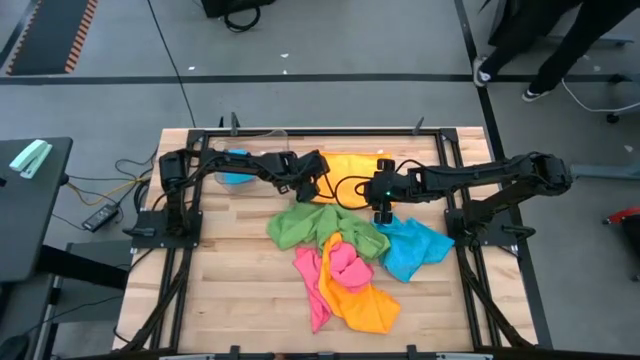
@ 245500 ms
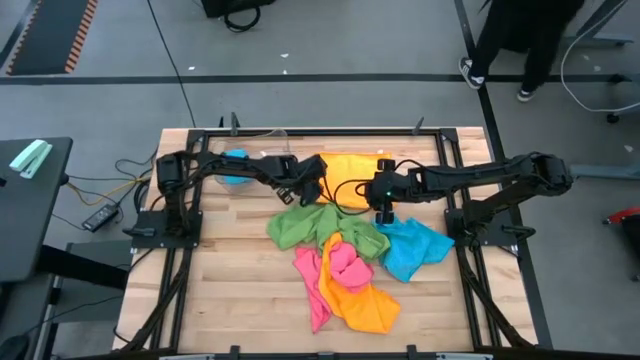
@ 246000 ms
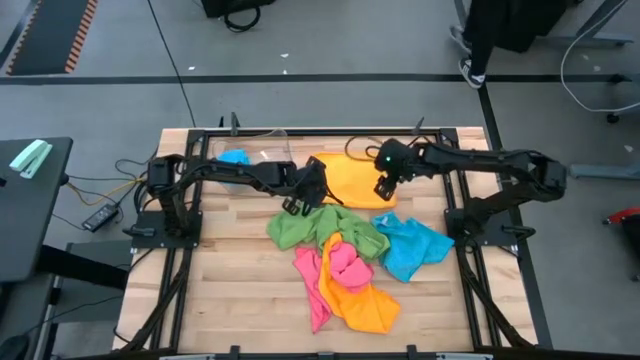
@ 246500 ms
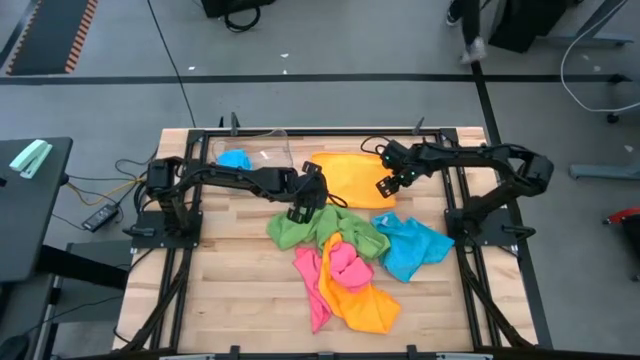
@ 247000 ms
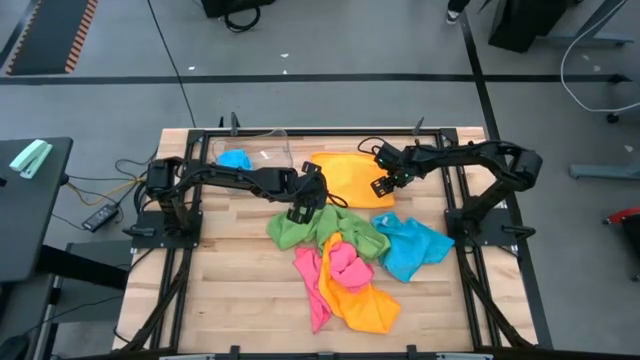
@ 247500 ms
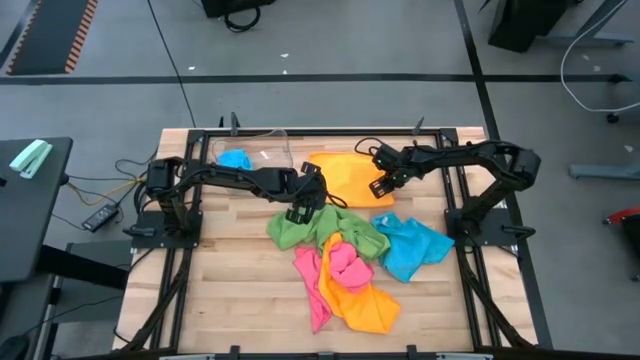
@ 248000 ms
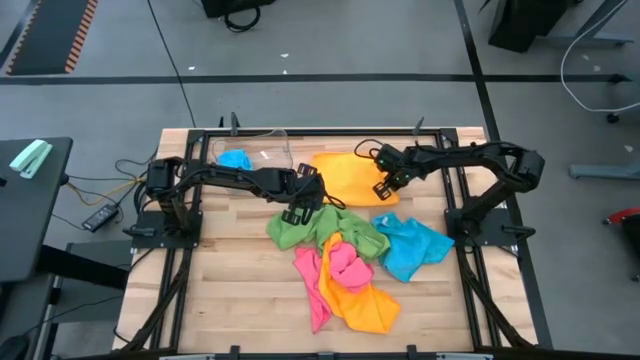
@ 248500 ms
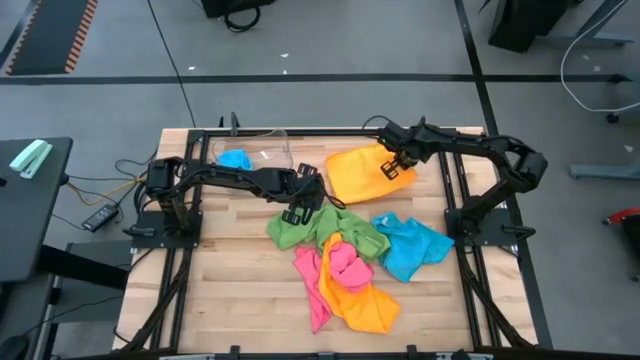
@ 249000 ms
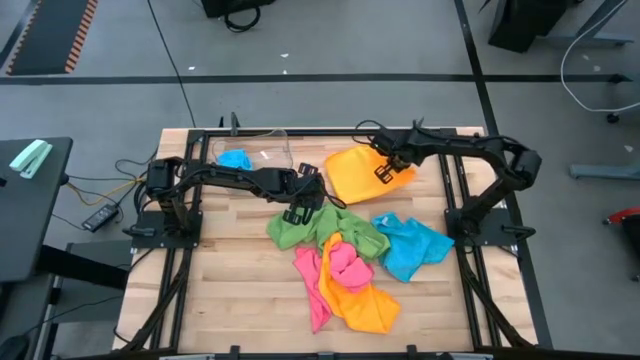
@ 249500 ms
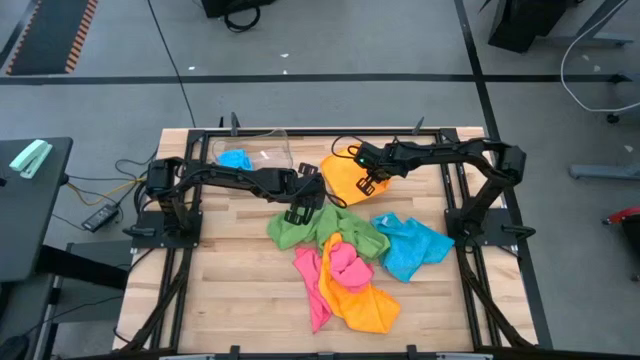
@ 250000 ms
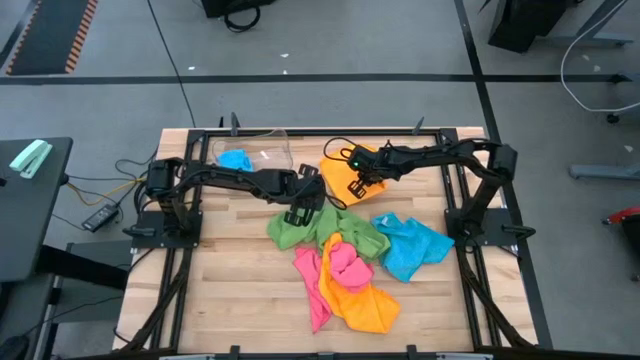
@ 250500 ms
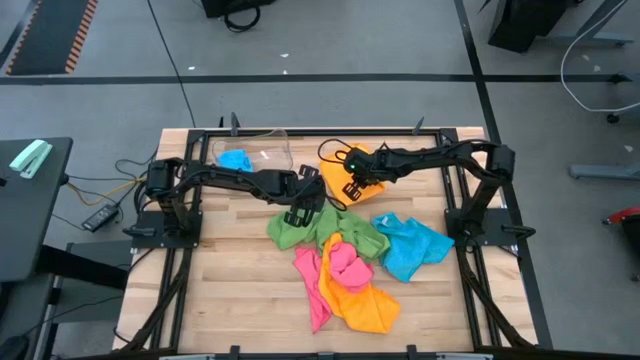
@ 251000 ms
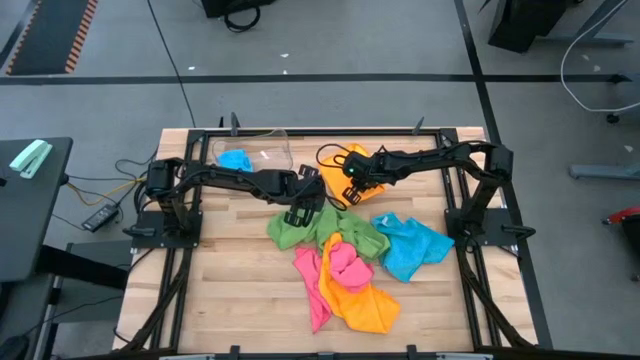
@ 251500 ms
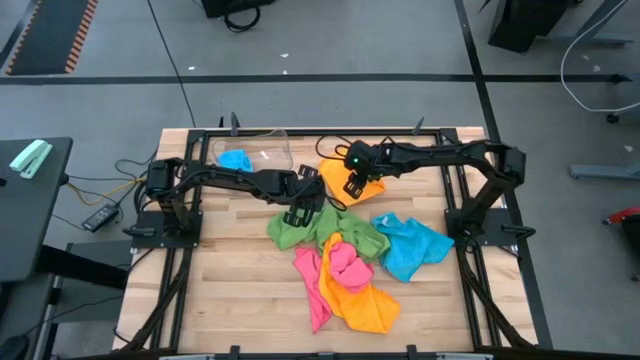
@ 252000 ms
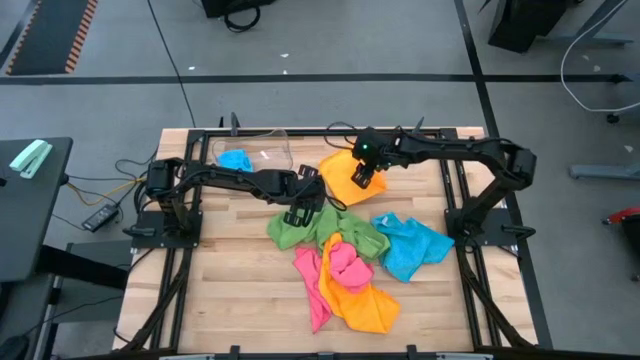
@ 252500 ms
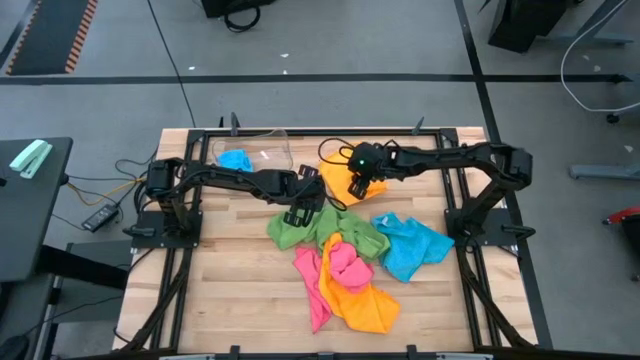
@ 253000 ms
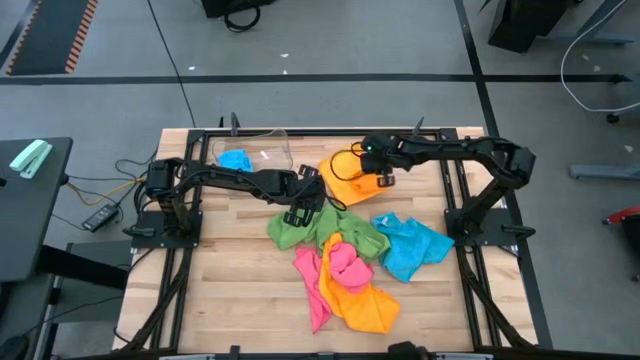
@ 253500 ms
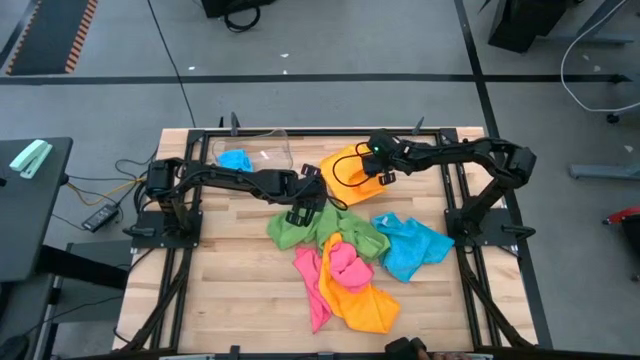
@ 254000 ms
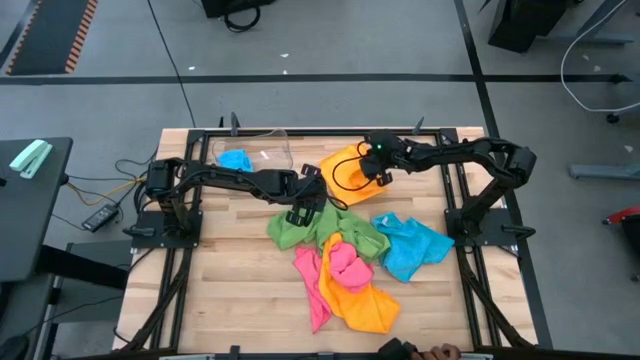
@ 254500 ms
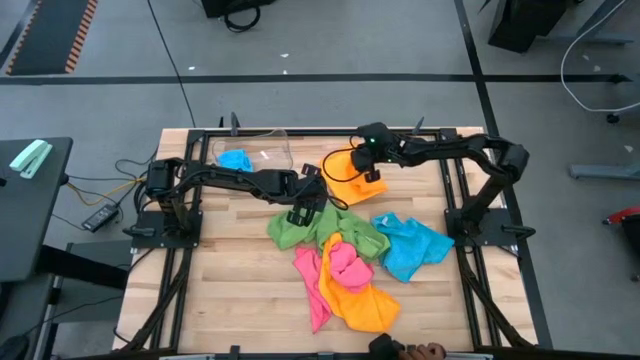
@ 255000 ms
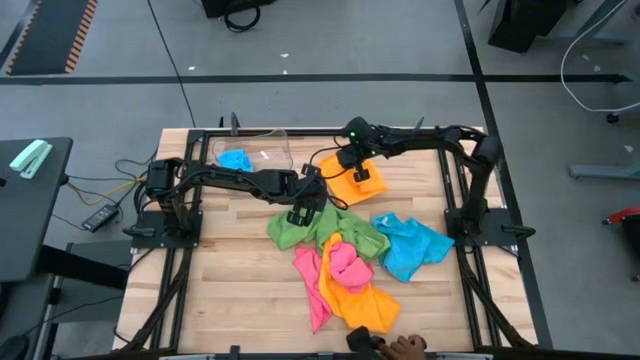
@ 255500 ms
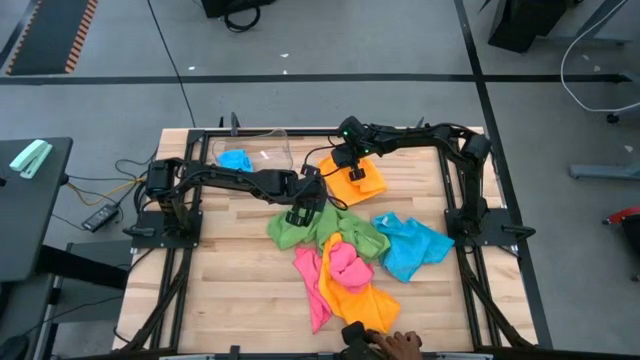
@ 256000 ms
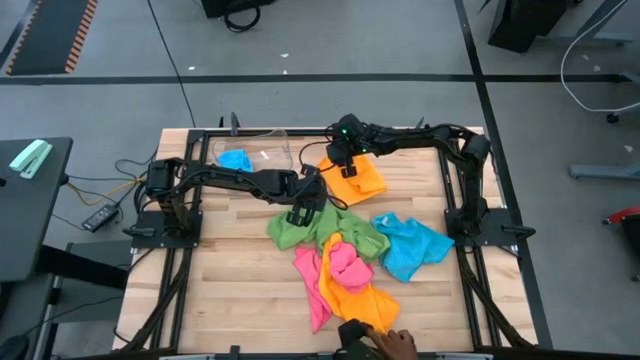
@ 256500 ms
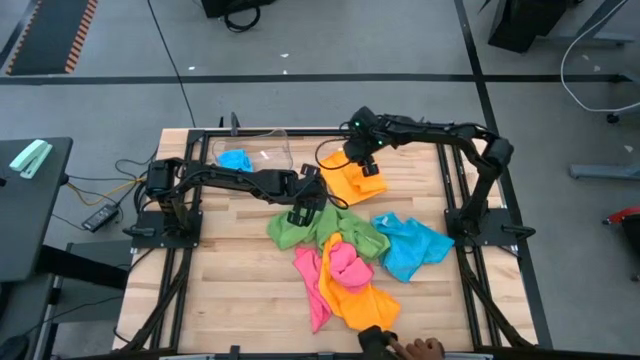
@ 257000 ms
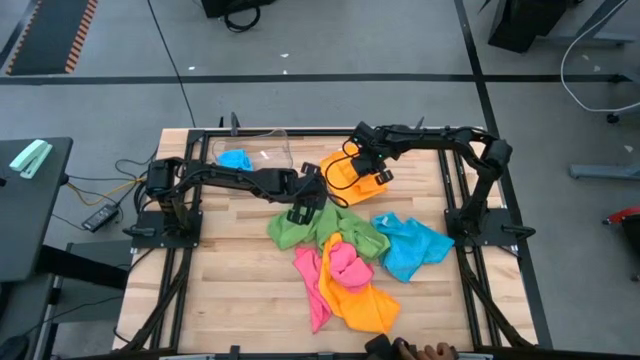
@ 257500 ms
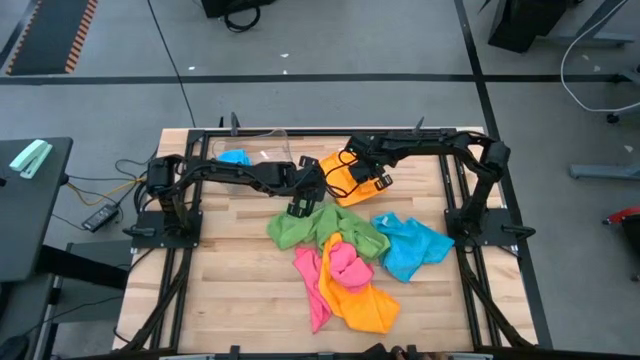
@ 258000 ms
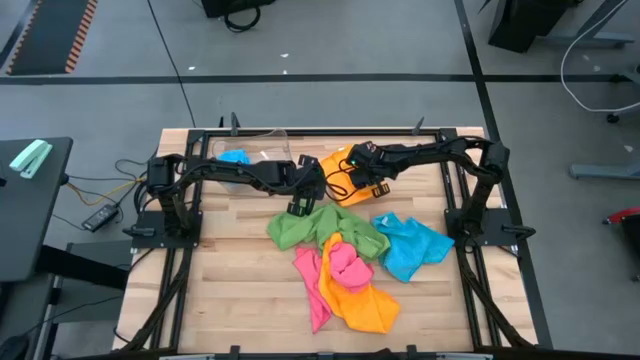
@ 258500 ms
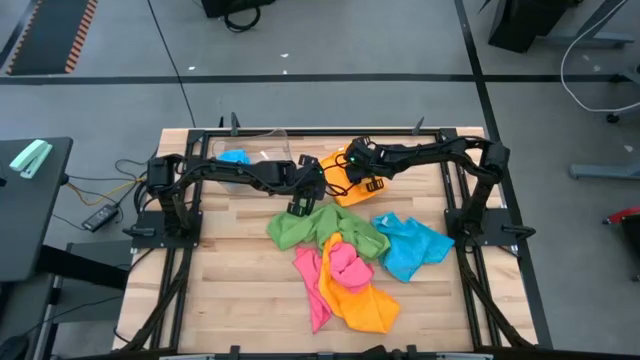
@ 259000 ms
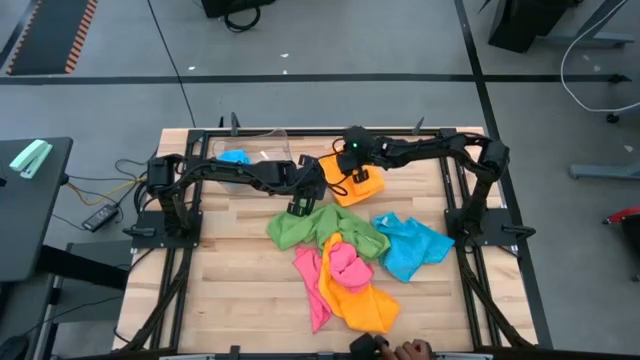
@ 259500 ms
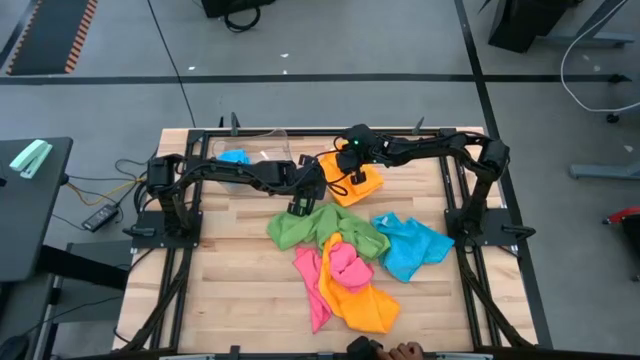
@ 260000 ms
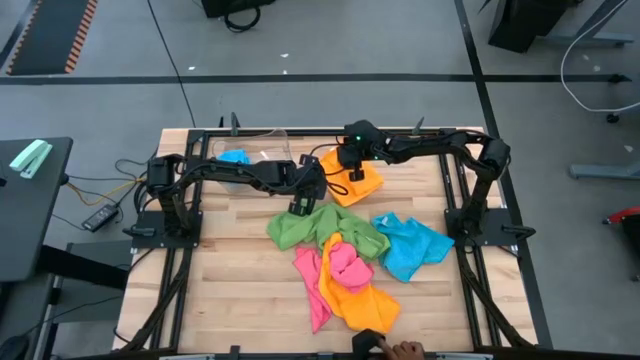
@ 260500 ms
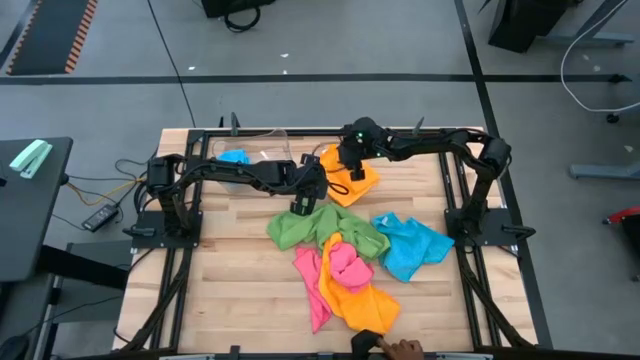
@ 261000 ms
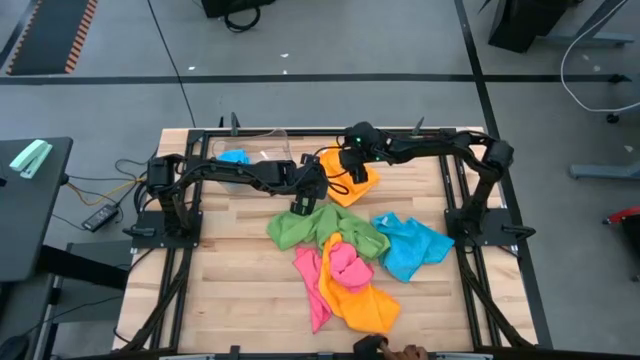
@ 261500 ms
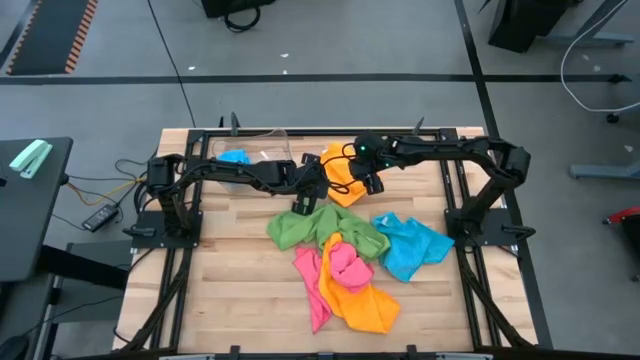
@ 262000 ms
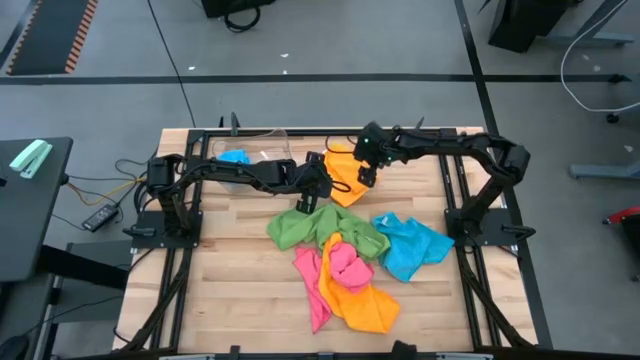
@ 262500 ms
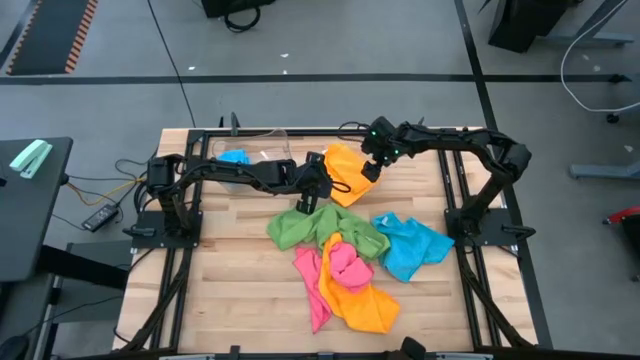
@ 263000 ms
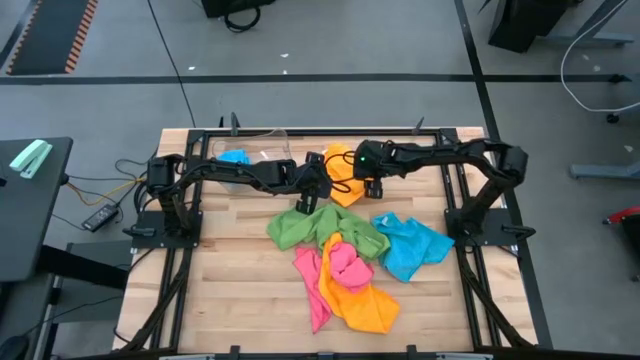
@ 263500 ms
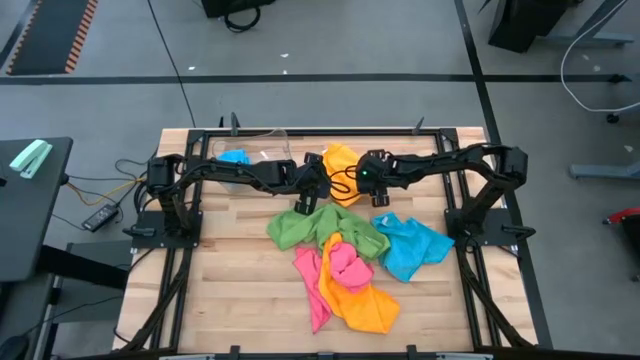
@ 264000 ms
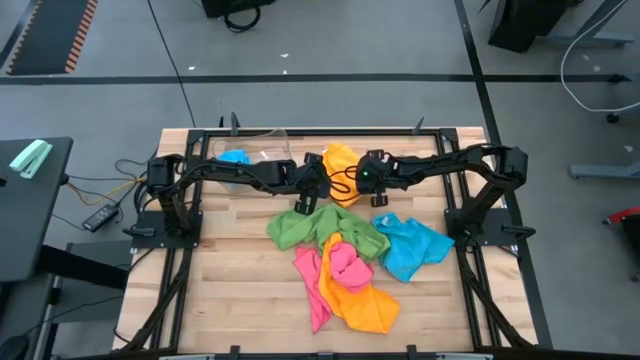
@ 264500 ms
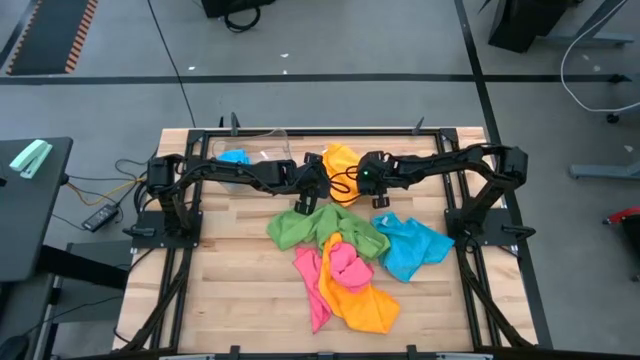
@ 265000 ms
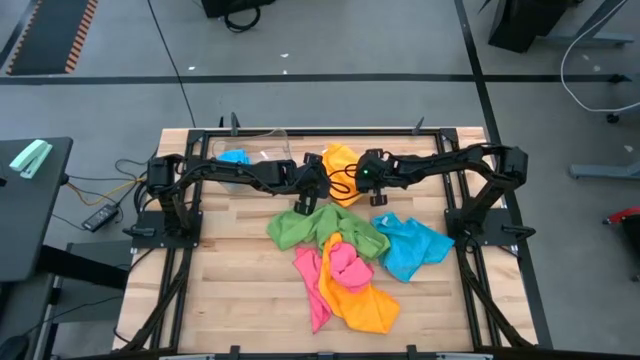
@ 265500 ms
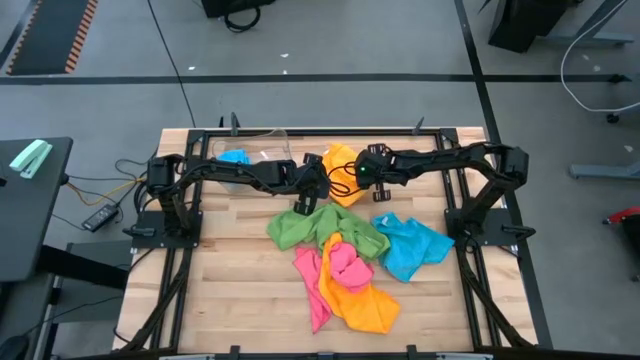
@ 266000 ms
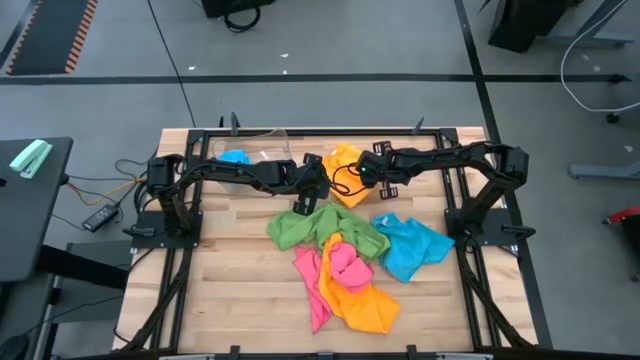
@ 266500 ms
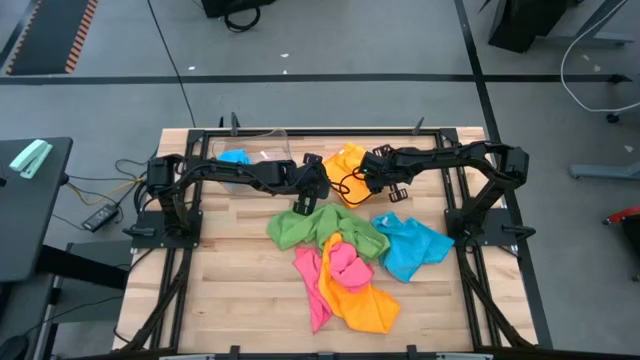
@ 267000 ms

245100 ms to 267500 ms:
Task: Fold microfiber towels
Fold the top orange microfiber towel
